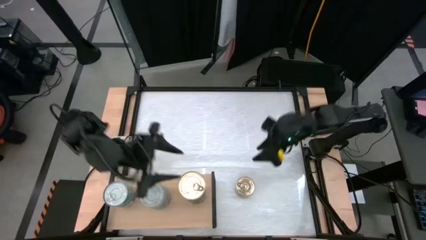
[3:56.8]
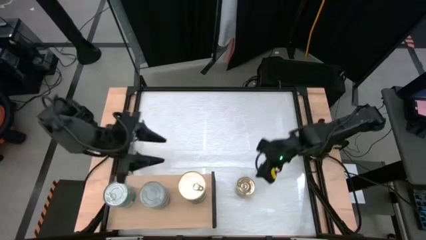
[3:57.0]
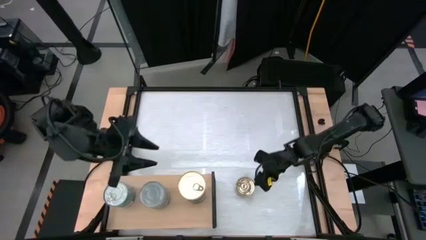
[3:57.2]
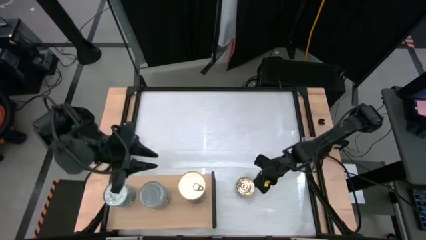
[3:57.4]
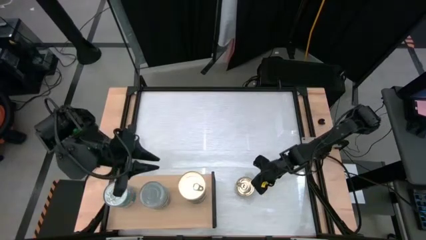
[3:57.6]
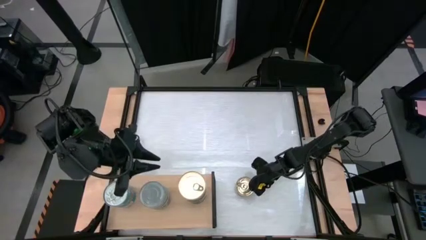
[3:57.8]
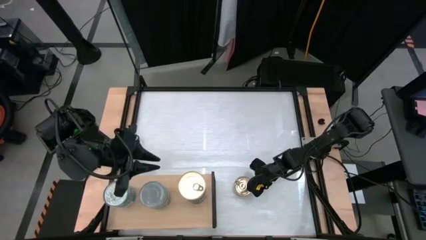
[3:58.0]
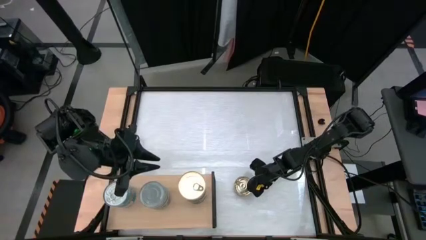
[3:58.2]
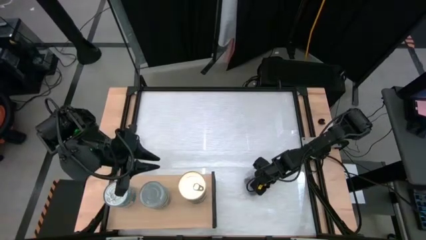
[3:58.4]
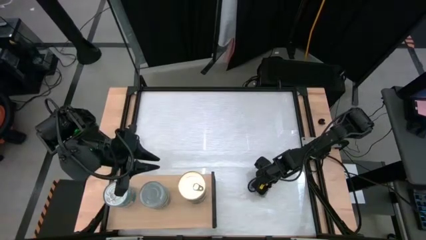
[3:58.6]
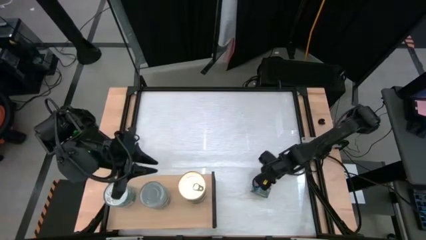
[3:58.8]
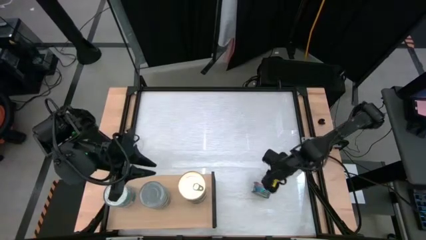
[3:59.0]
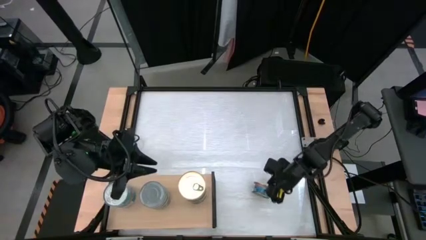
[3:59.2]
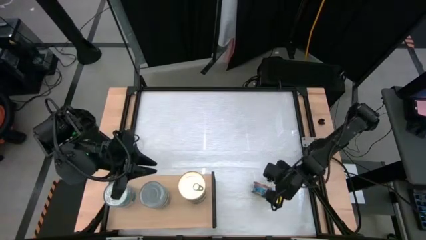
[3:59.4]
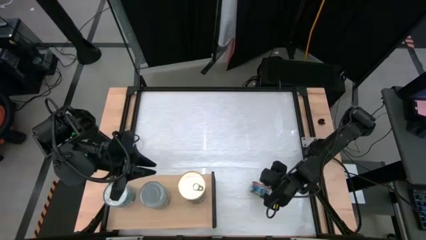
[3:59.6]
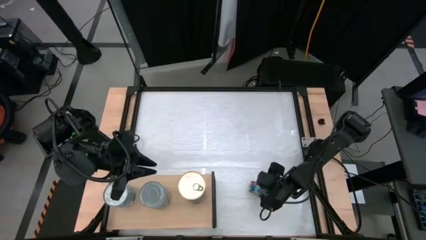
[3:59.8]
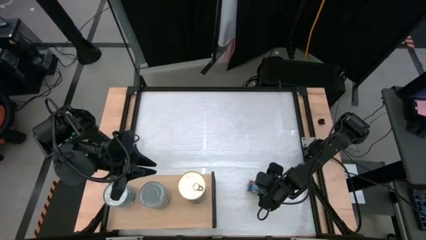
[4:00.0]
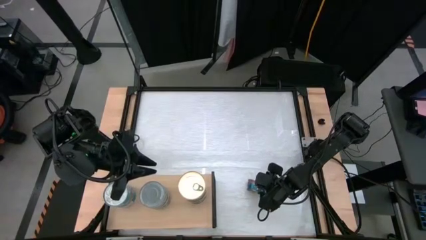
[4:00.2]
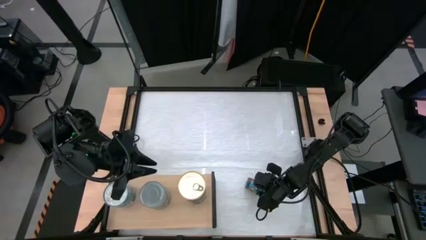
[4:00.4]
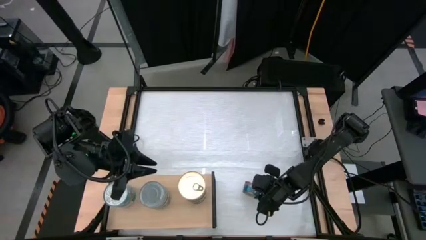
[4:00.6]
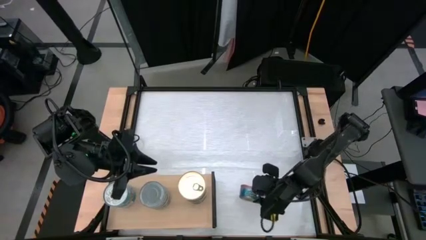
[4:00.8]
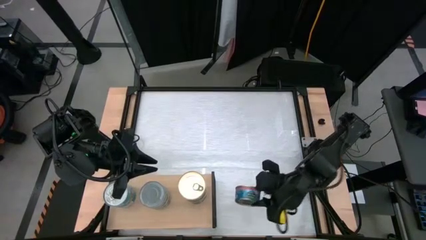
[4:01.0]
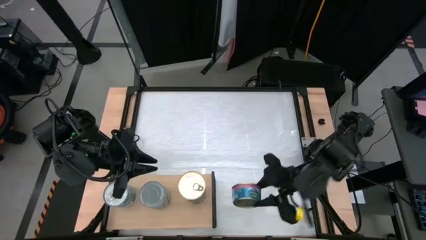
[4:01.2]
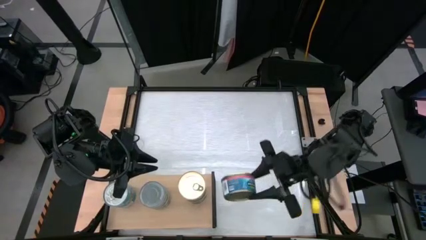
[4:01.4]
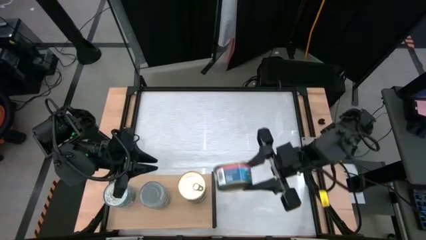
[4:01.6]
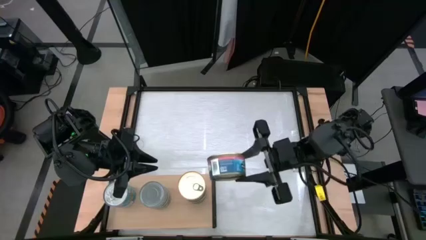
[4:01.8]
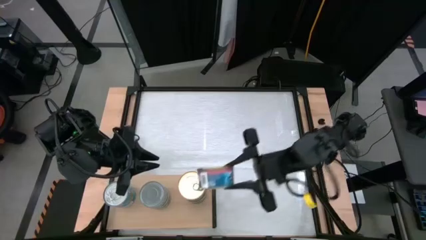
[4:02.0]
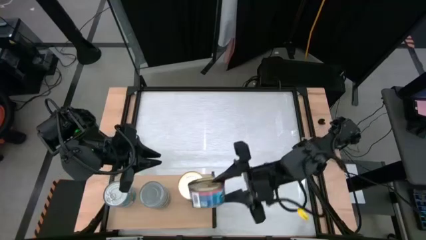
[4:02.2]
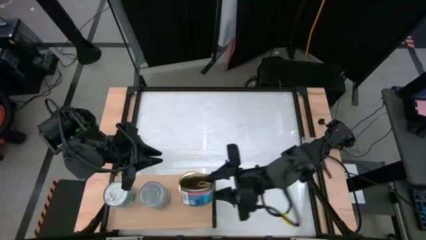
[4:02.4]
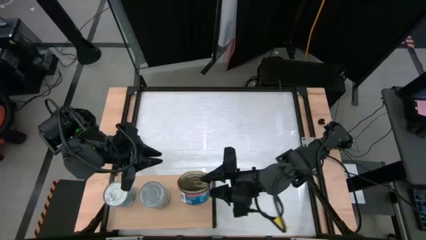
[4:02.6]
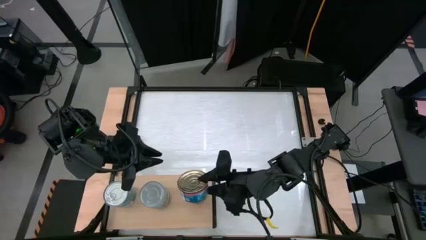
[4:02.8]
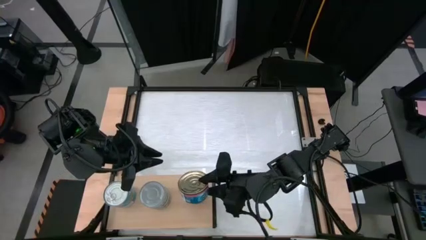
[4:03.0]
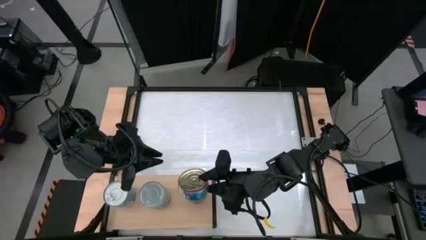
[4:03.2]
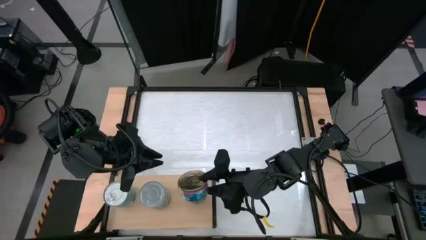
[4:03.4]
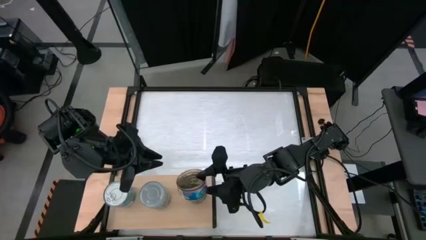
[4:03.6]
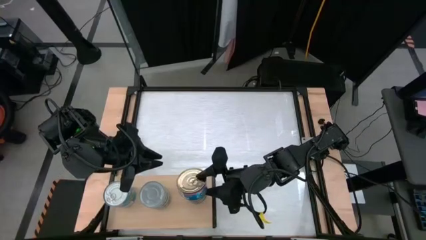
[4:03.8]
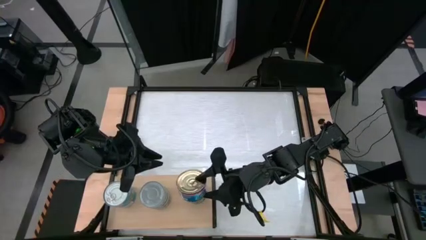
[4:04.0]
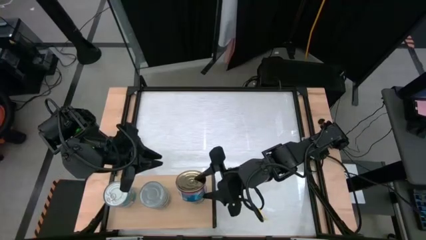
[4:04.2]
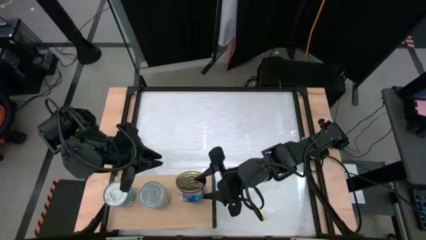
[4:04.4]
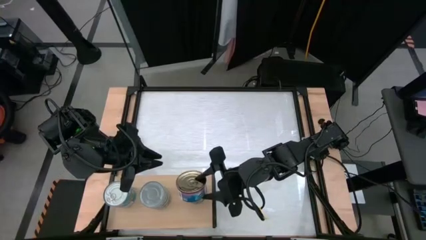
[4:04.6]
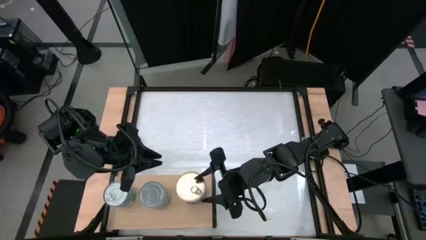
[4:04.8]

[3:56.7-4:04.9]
Task: Stack canned seafood by type on shelf
Stack the blue pink tuna can on top of the blue pink tuna can on the shelf

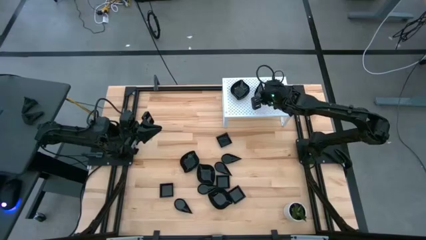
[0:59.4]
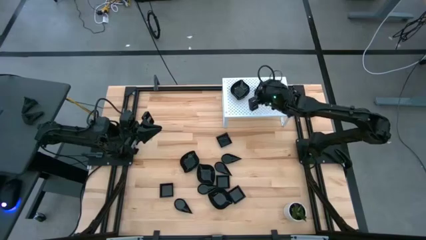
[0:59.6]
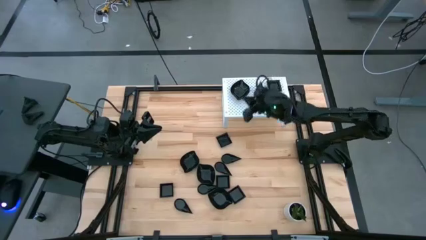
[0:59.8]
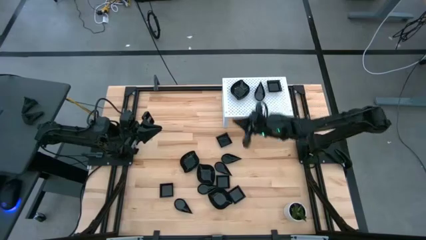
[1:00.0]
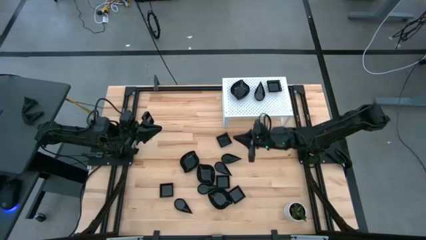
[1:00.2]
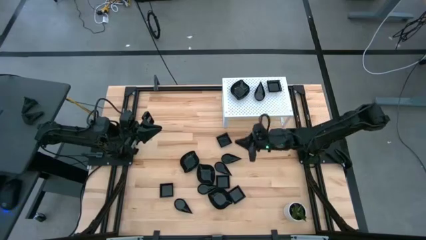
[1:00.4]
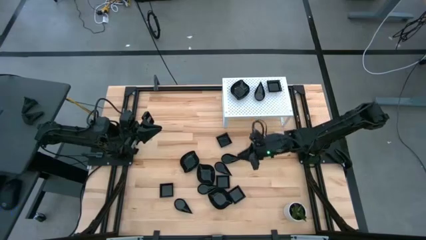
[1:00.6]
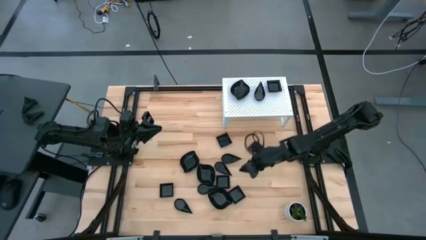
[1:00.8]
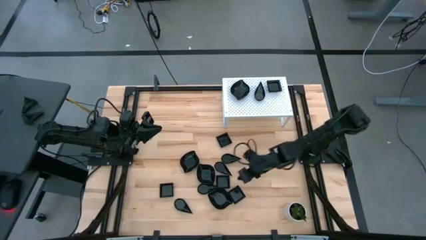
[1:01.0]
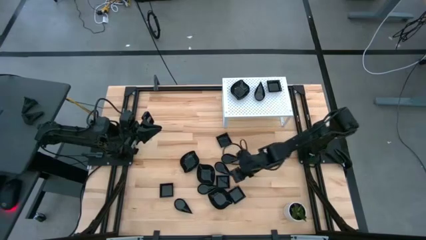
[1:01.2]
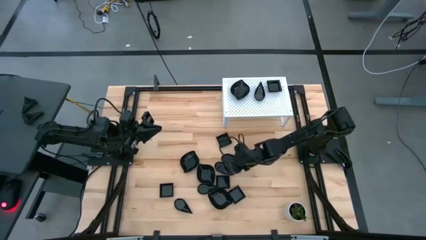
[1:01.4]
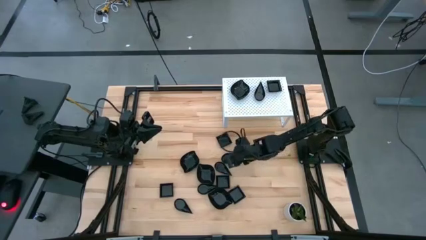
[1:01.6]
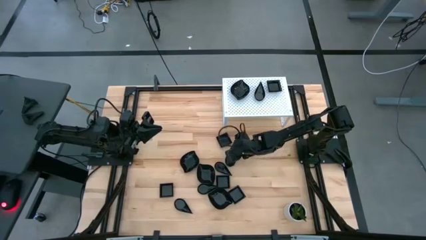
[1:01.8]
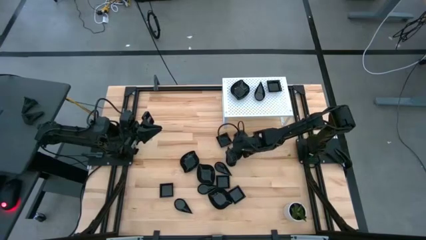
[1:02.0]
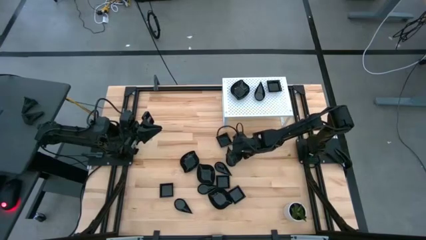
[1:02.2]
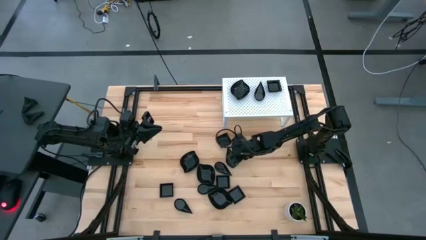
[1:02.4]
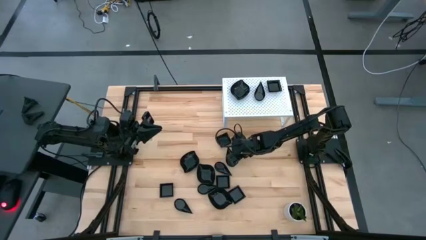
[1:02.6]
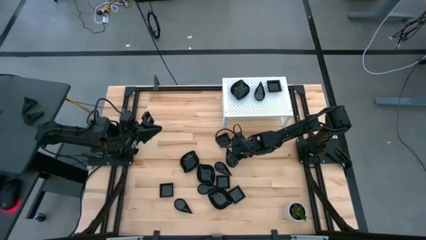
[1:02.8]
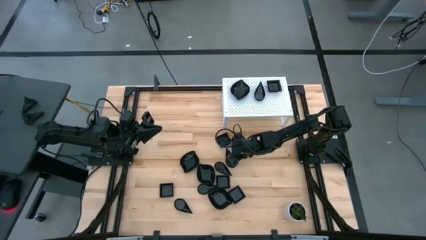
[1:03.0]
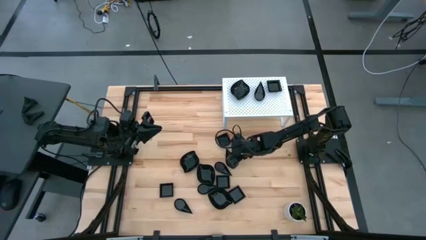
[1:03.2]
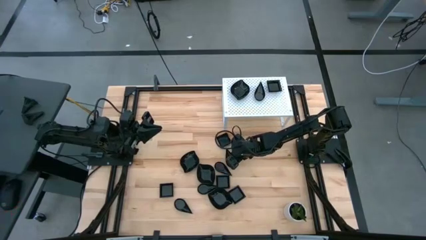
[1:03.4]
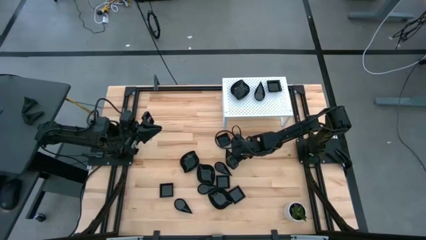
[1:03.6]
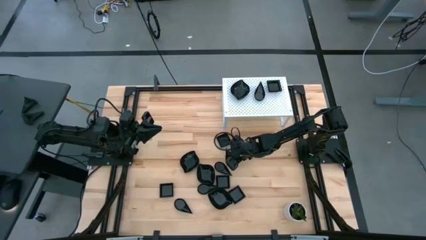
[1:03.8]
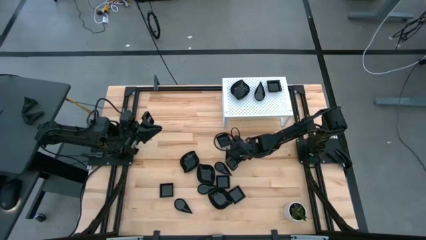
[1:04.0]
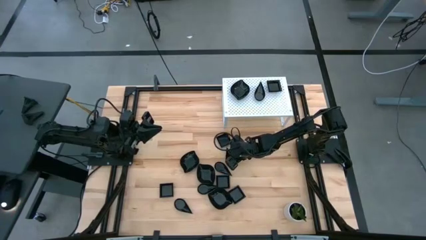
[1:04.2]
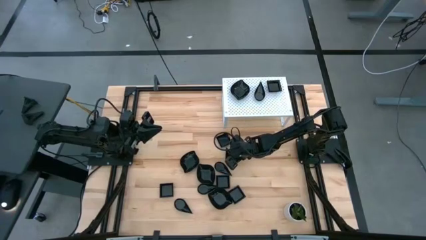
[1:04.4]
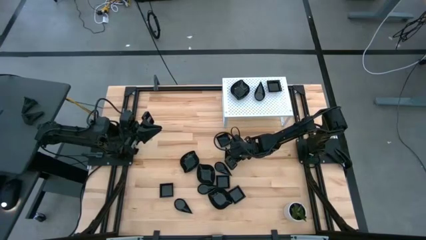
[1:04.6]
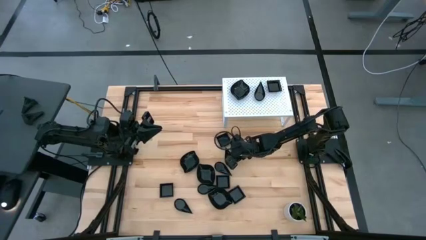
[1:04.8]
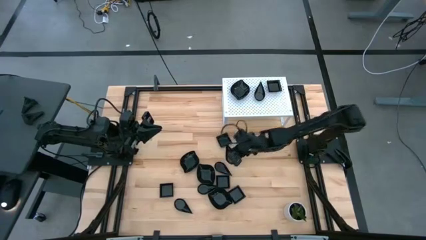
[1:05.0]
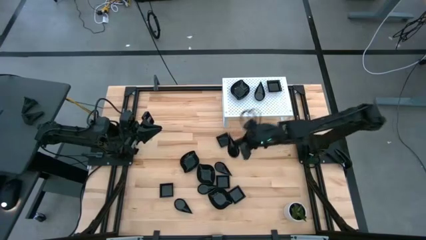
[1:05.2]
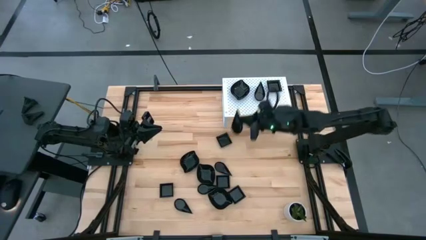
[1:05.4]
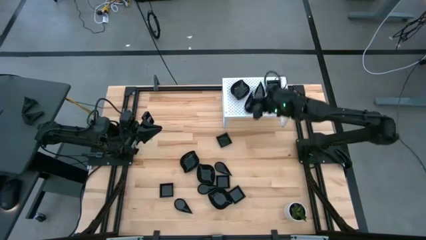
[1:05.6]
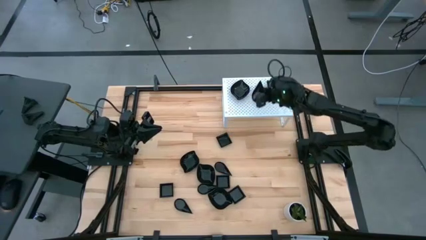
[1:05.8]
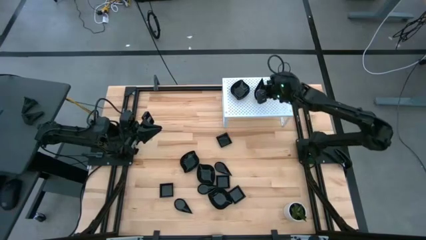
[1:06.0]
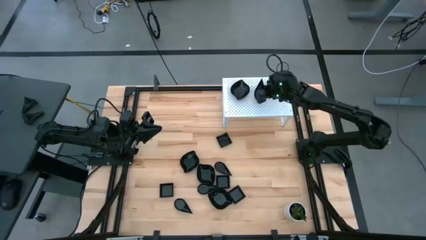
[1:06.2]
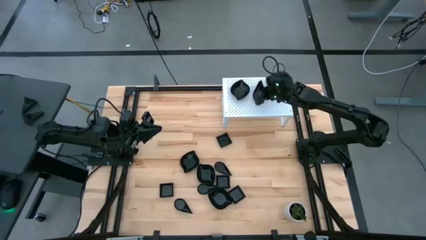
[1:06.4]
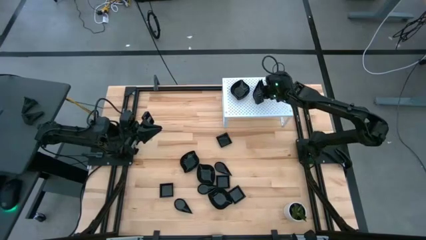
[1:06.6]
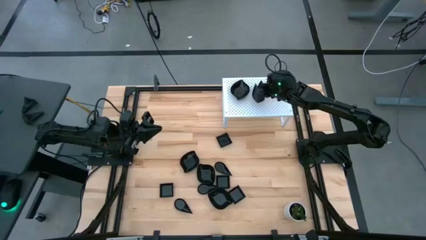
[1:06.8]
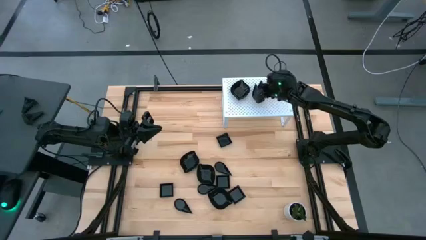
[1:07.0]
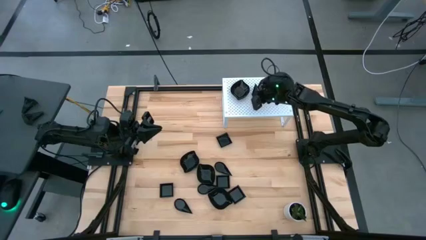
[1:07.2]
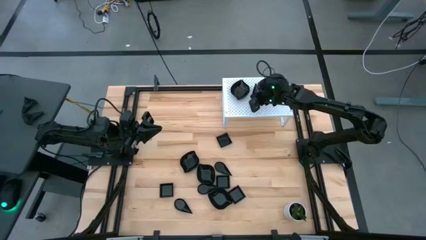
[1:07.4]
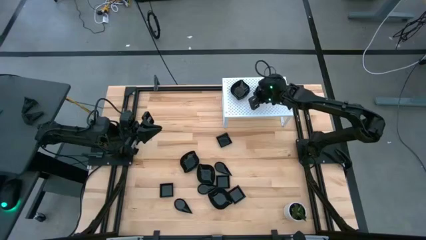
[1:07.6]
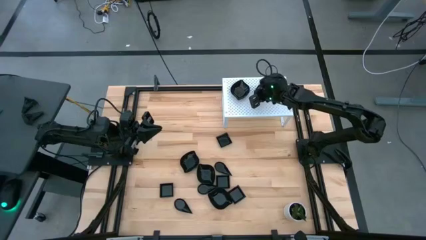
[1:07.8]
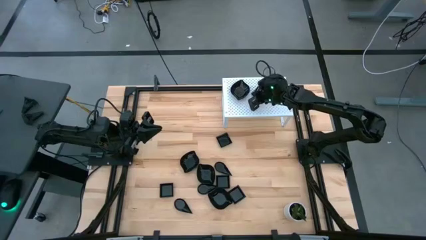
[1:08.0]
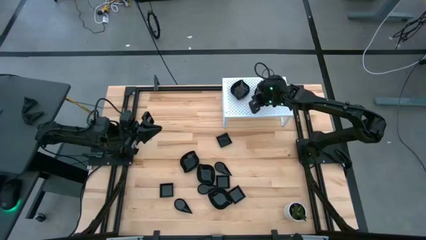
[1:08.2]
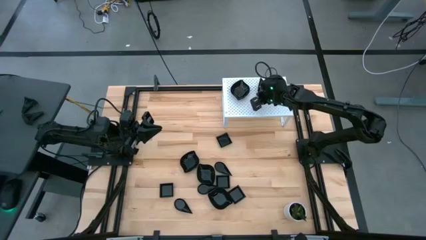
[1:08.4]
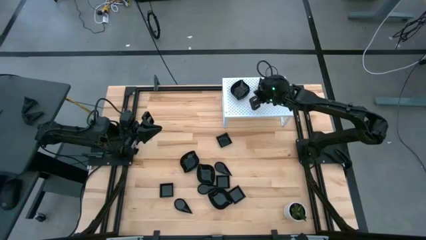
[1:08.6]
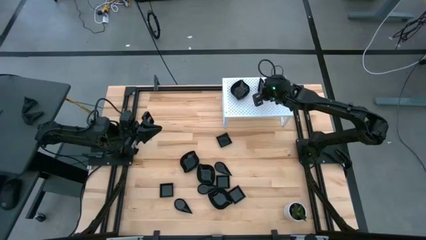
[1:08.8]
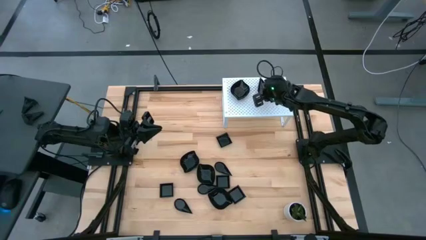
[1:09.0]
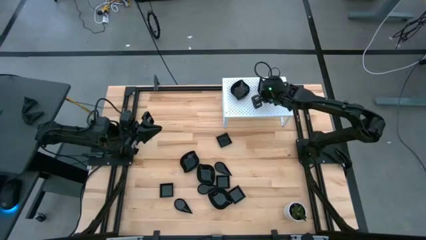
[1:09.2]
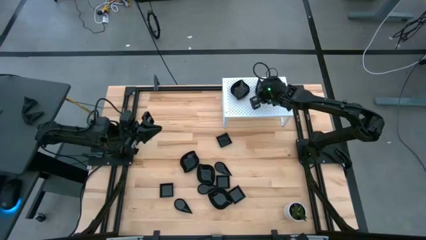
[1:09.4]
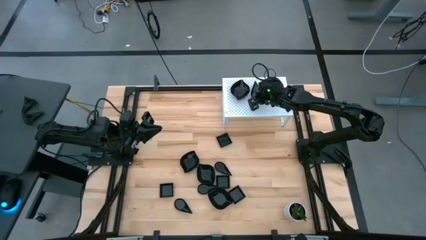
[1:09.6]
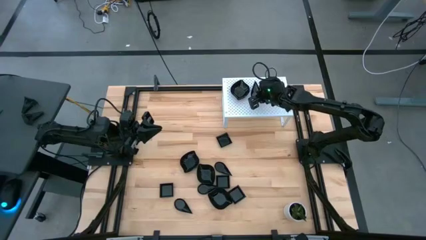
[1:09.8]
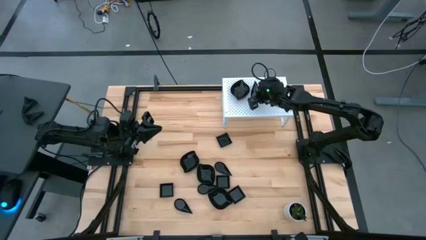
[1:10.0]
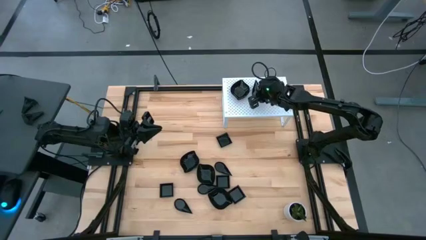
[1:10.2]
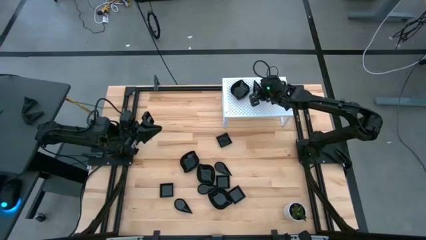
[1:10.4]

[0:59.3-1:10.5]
Task: Pick & Place Mini shaped plates
Stack the drop shaped plate on top of the drop shaped plates on the shelf
